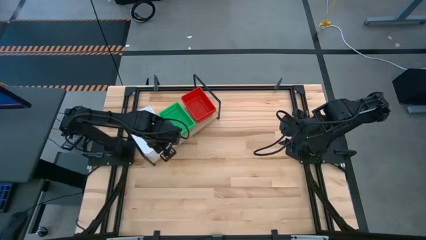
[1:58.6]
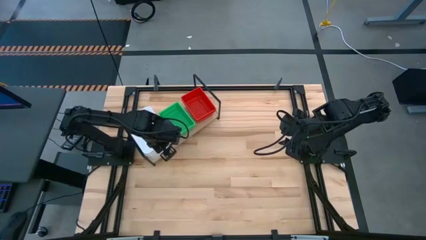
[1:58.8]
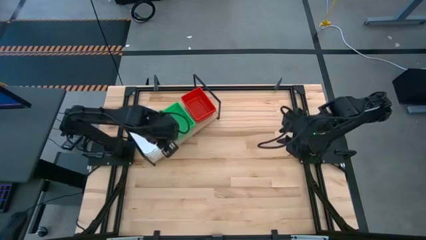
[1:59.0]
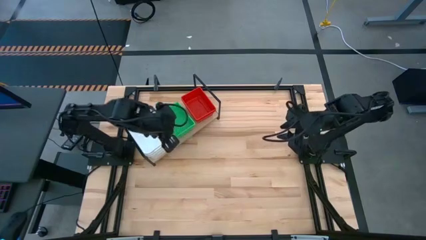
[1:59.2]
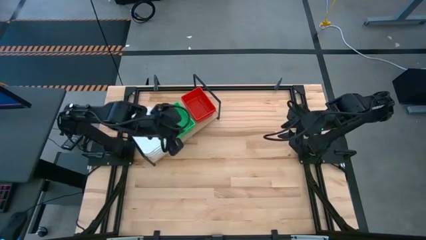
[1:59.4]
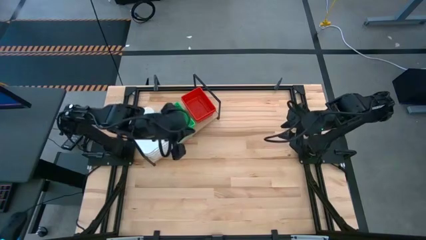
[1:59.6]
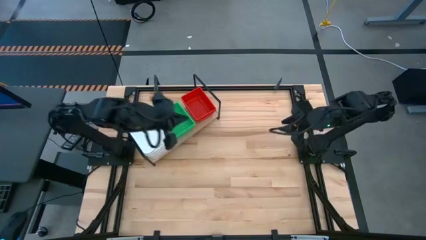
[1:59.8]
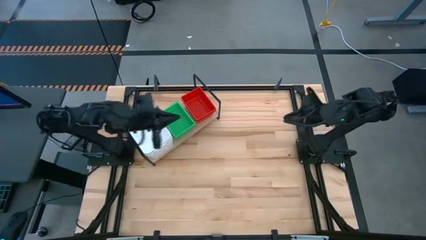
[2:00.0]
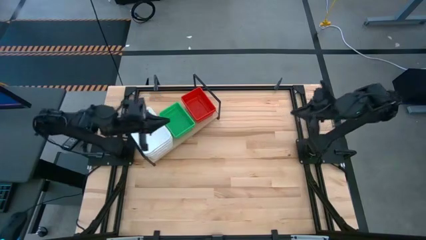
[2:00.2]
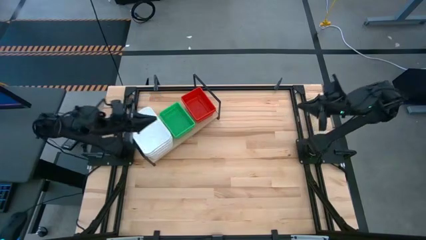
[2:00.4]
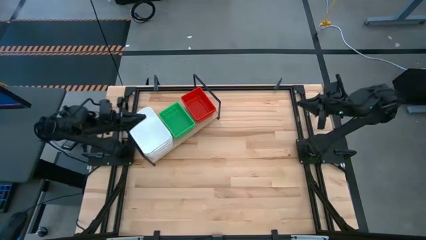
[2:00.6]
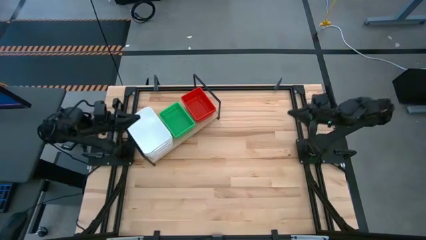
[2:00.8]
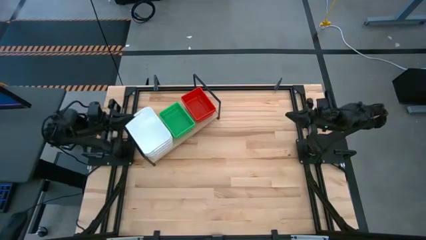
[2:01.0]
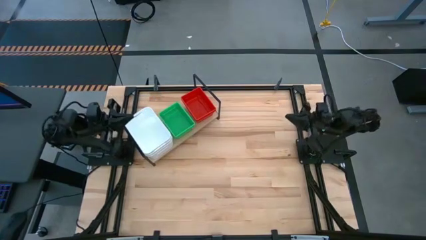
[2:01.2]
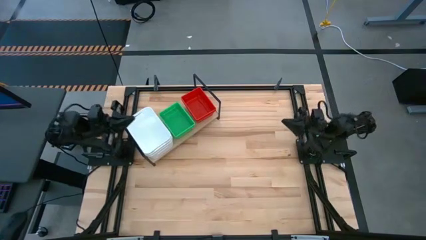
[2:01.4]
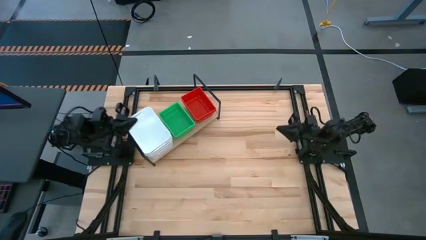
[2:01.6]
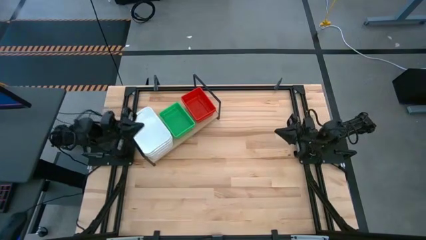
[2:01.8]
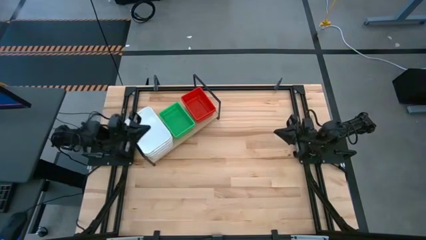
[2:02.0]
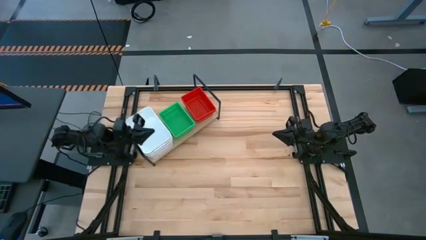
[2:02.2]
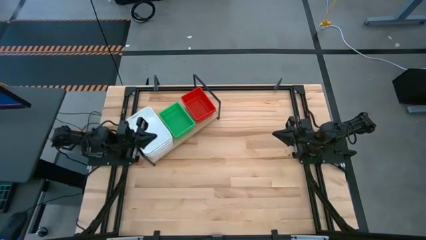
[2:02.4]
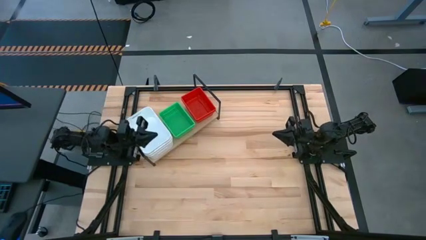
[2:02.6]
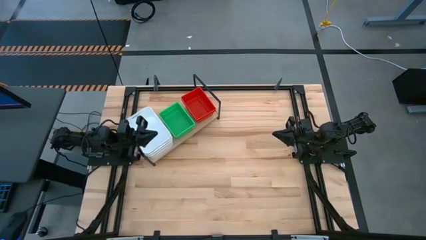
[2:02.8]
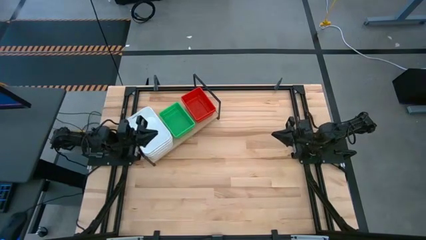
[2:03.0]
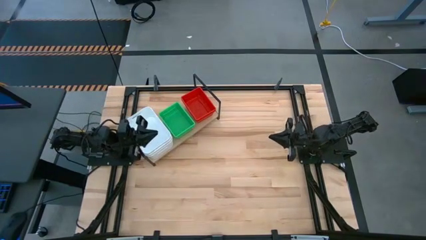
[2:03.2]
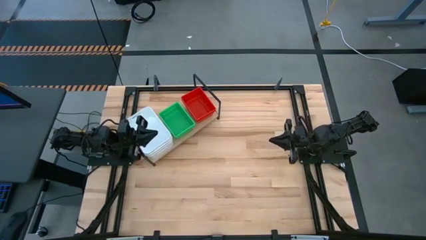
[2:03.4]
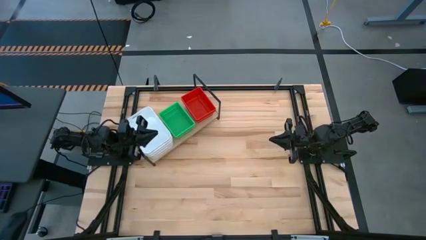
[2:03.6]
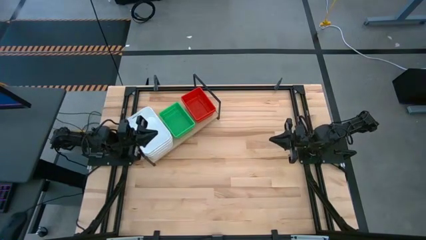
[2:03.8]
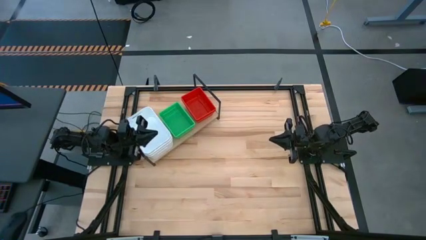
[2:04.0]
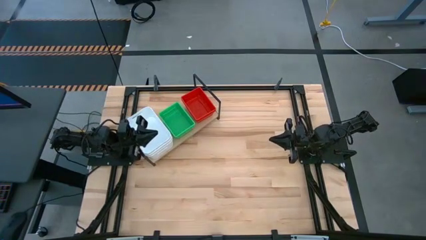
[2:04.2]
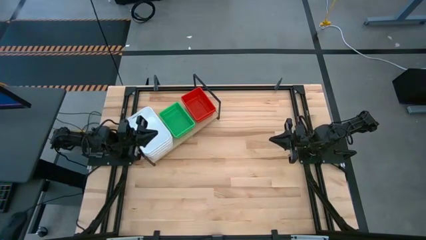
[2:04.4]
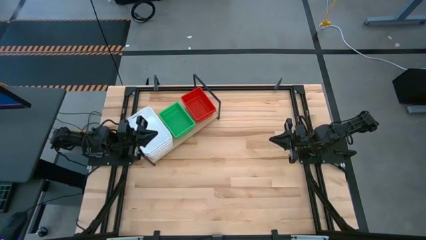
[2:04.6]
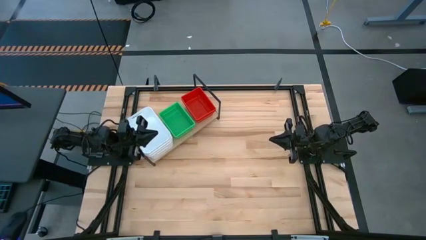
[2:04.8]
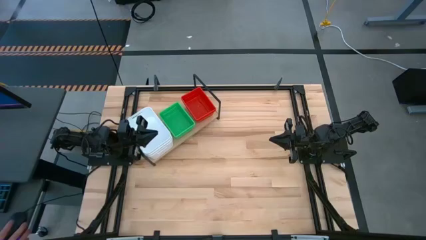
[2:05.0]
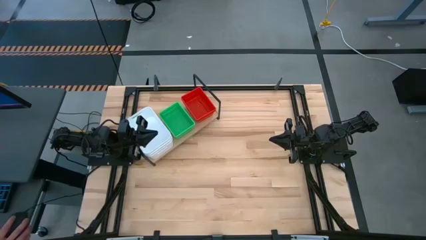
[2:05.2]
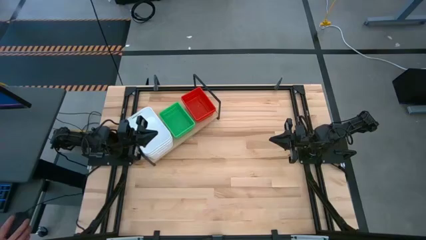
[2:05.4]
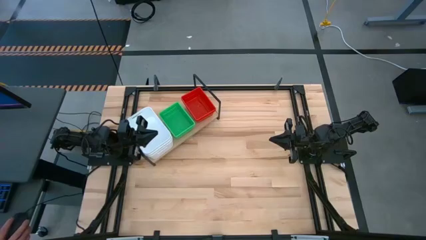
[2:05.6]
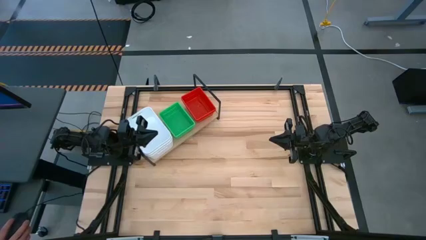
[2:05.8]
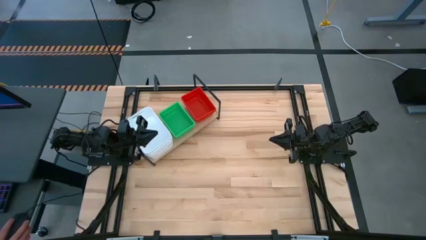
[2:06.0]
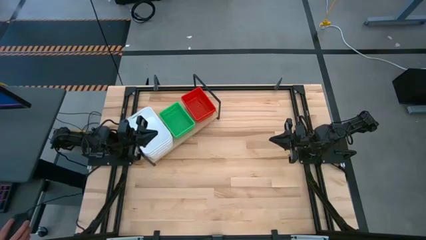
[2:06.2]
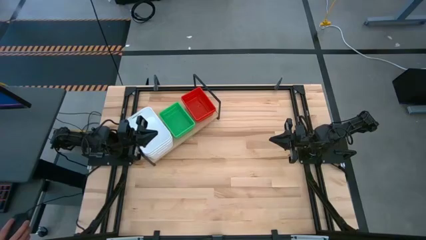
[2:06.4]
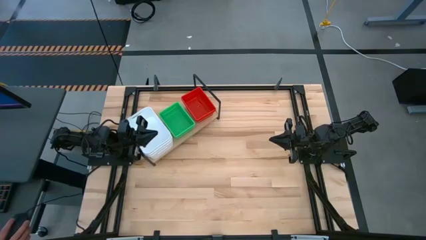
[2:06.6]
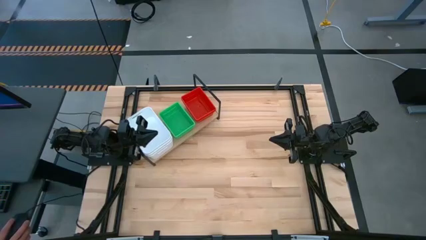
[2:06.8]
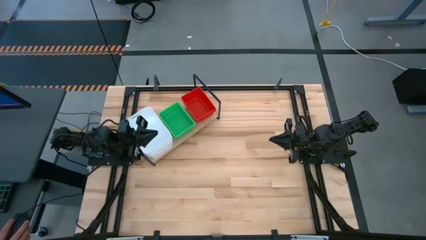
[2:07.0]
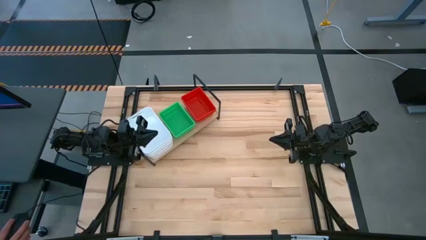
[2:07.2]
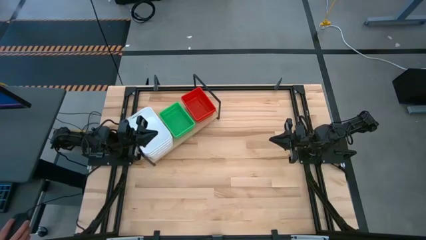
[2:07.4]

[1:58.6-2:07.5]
Task: Stack baskets on shelf by color
Return to Home Position

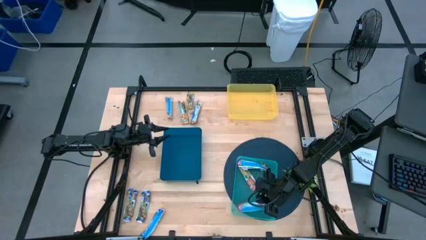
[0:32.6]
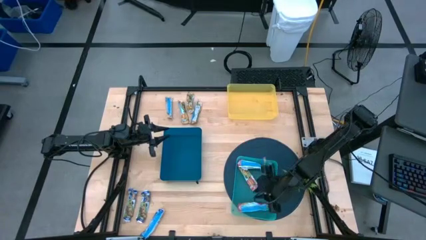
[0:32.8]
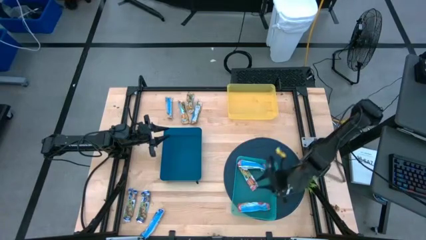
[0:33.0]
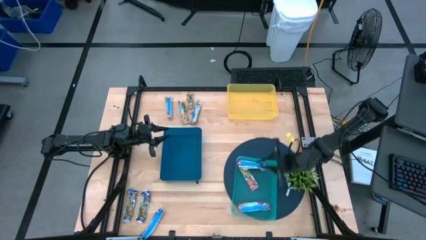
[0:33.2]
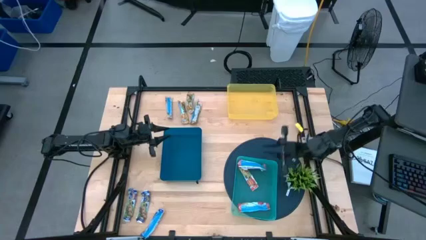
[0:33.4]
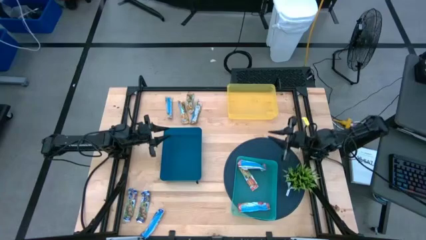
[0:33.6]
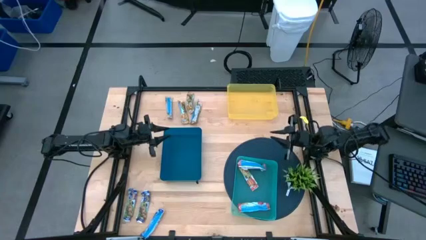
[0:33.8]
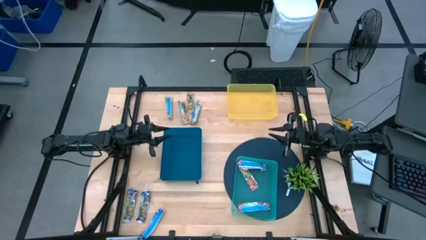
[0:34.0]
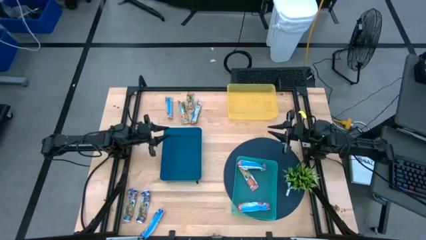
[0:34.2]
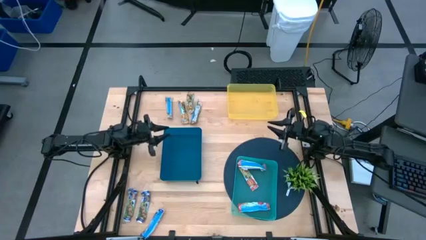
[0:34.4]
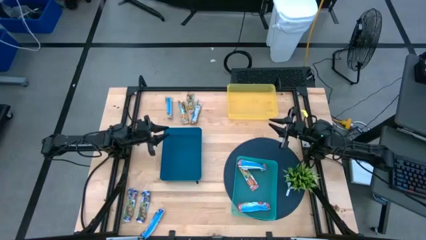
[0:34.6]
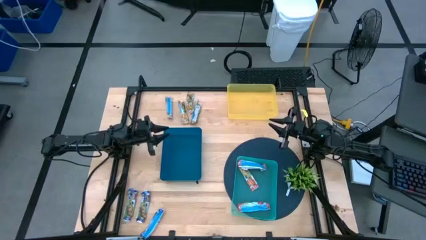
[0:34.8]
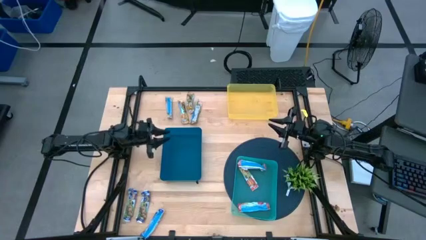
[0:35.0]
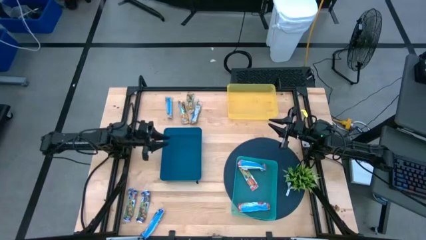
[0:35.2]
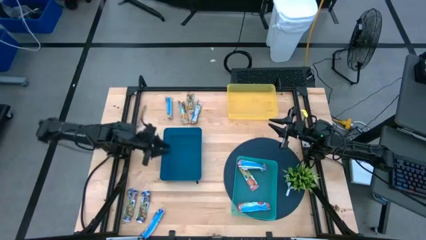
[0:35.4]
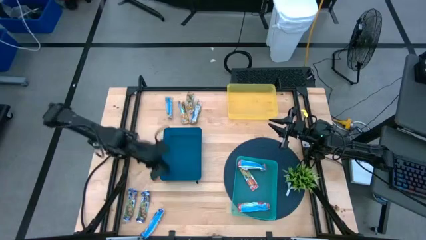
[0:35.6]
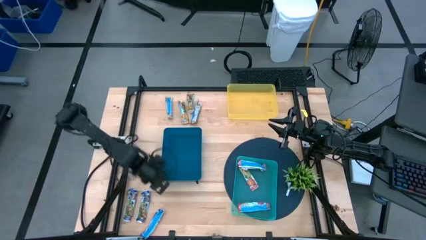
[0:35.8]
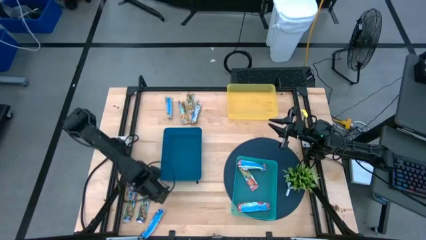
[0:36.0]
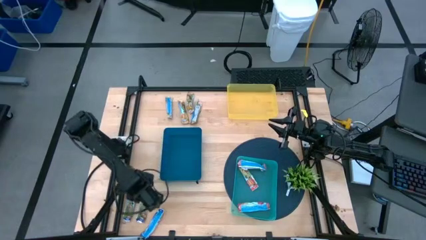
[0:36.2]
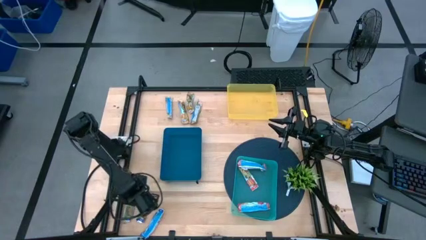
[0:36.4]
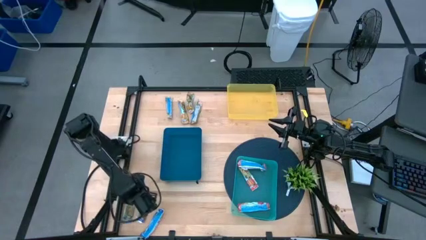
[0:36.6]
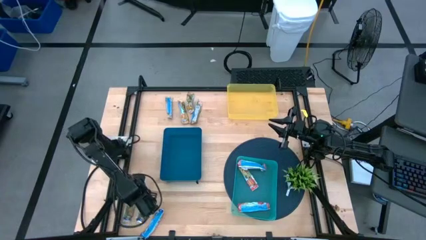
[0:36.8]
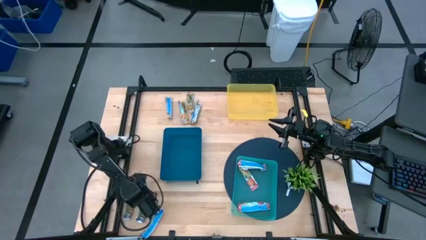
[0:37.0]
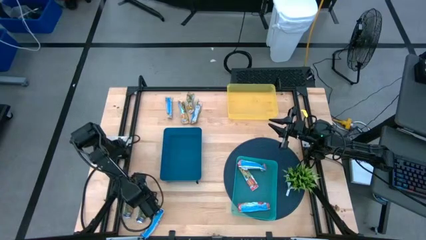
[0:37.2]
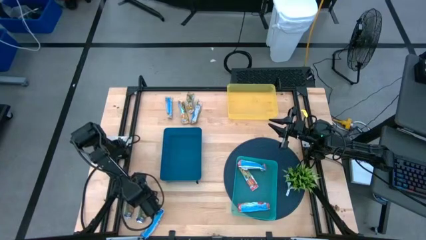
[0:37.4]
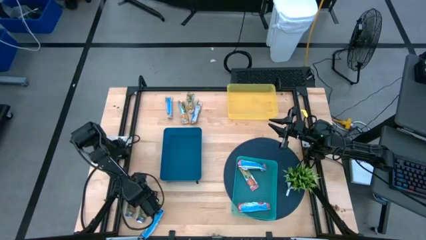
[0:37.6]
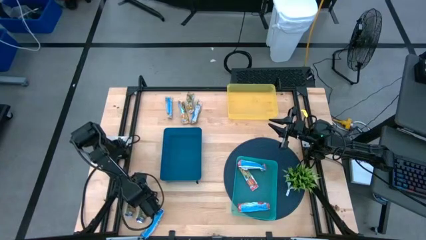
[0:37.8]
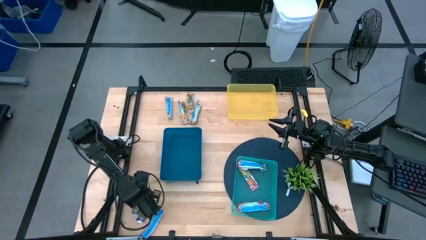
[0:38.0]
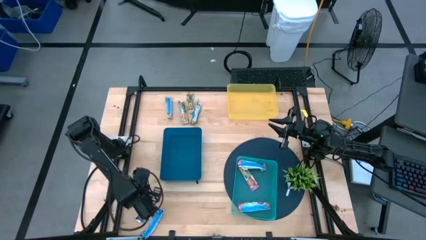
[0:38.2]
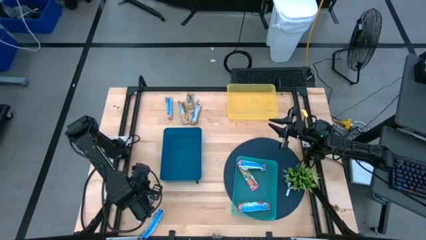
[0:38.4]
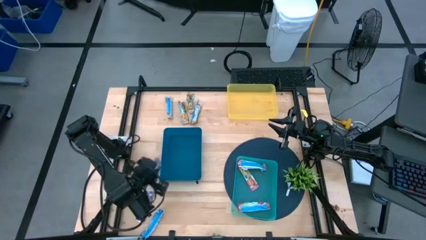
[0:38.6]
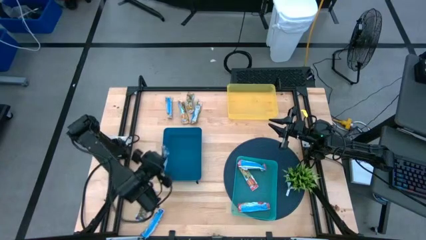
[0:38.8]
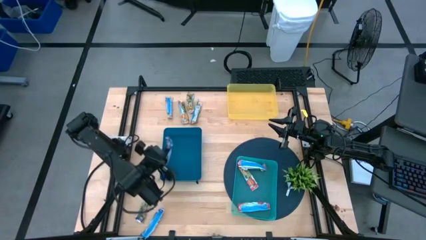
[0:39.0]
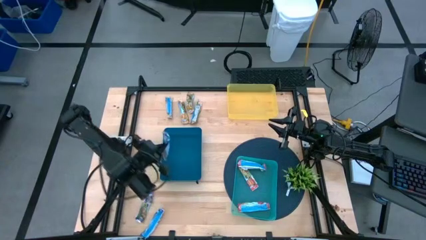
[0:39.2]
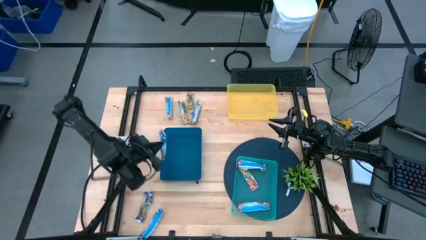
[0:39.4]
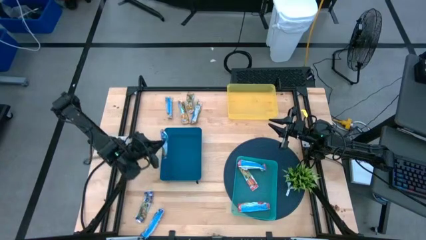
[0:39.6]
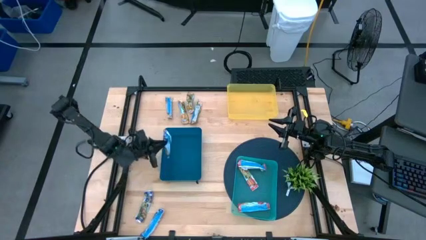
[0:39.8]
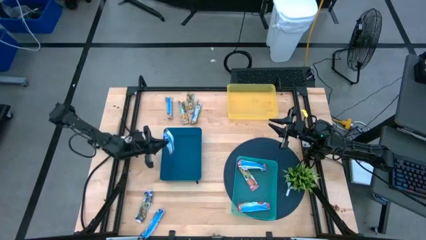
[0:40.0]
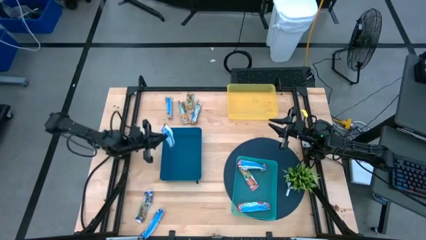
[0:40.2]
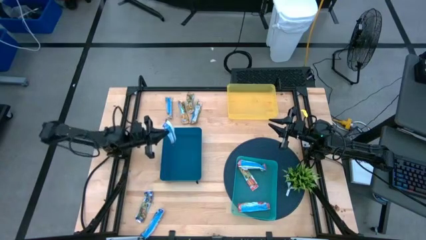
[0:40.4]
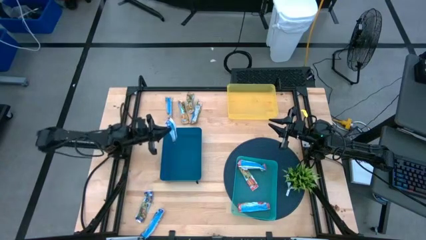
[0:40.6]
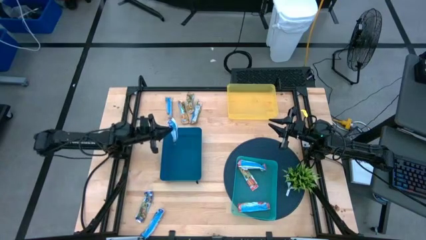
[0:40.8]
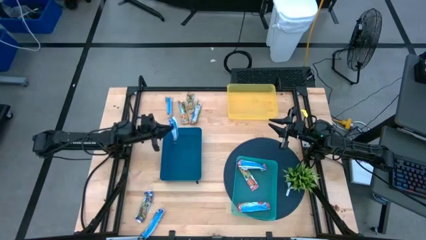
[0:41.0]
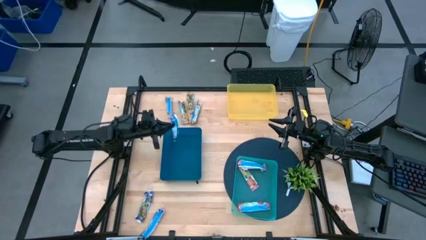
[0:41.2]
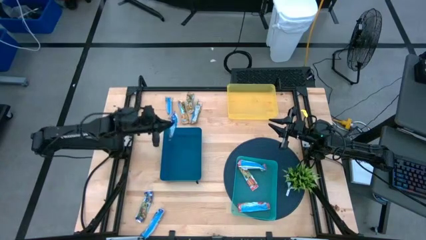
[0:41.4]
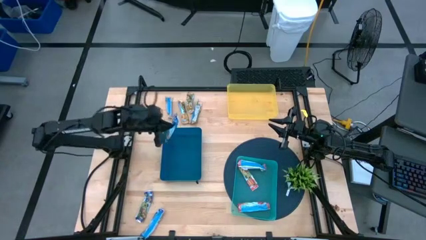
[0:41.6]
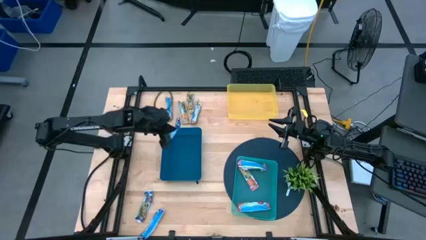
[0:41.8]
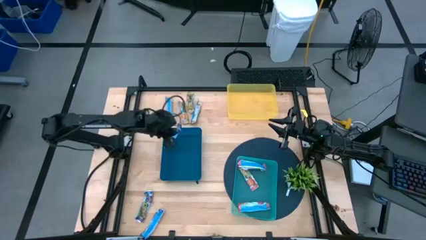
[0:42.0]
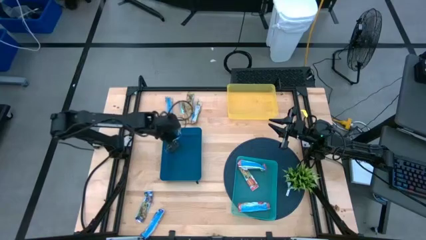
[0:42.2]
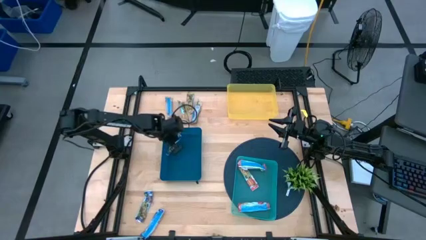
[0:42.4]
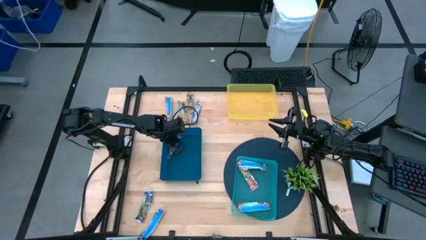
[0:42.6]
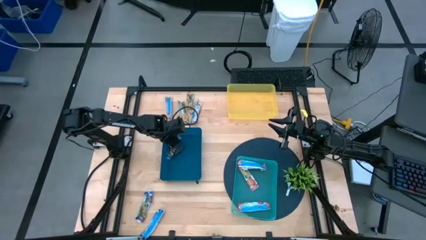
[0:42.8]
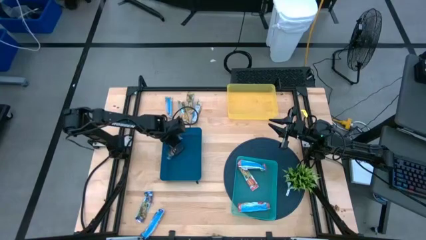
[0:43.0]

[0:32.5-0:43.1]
Task: Pick and place Granola Bars by type
Put the left blue granola bar into the blue bin
